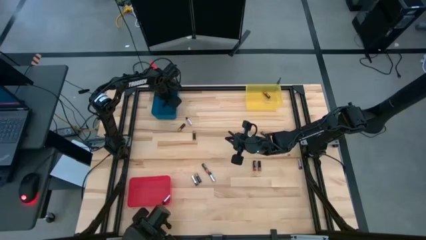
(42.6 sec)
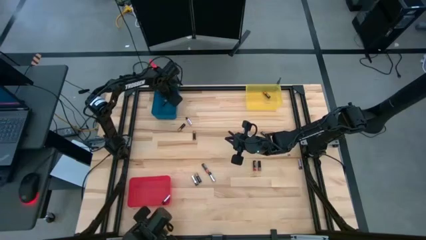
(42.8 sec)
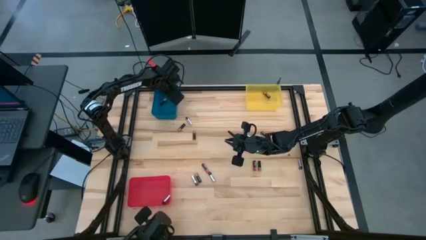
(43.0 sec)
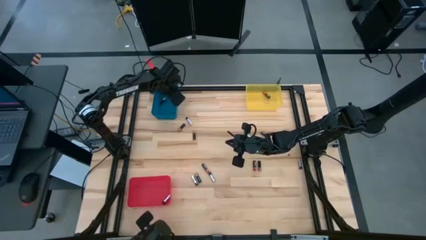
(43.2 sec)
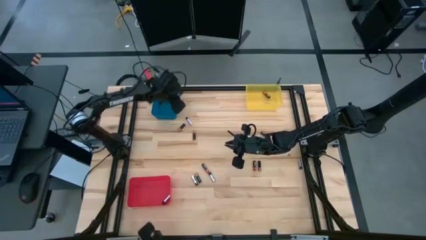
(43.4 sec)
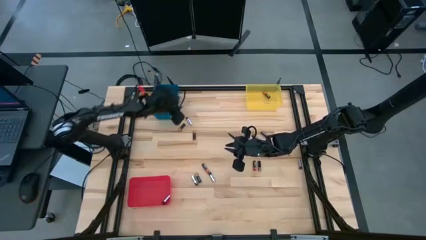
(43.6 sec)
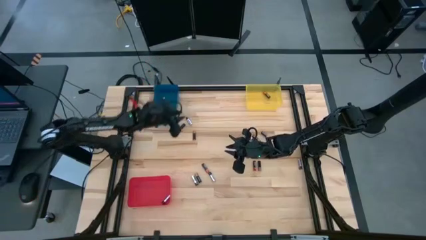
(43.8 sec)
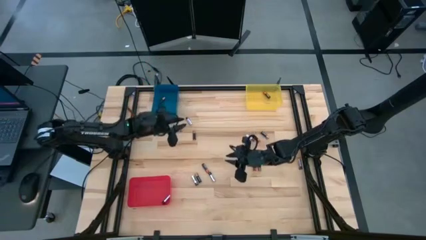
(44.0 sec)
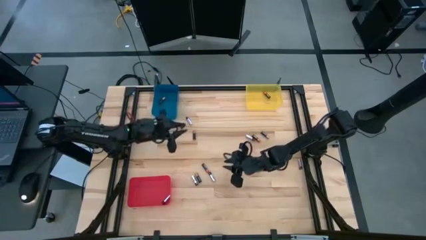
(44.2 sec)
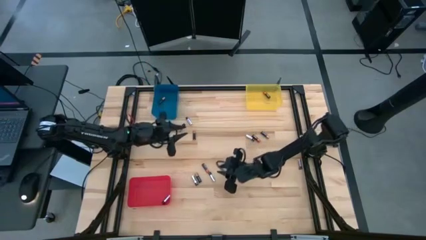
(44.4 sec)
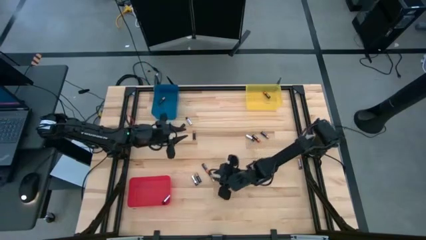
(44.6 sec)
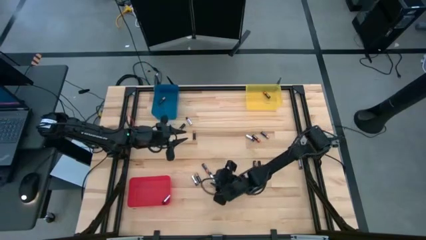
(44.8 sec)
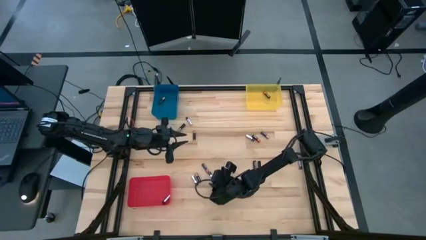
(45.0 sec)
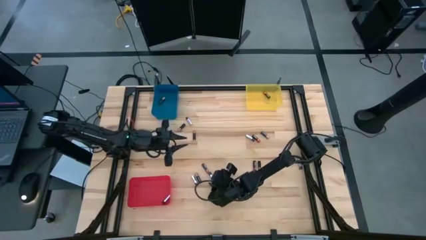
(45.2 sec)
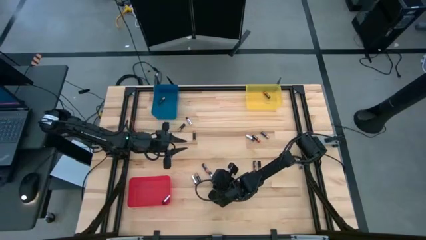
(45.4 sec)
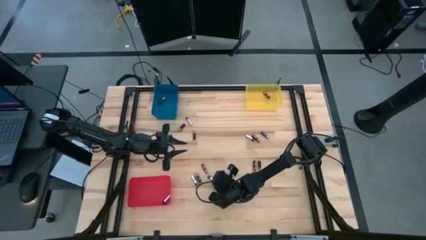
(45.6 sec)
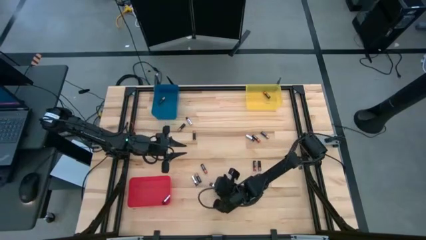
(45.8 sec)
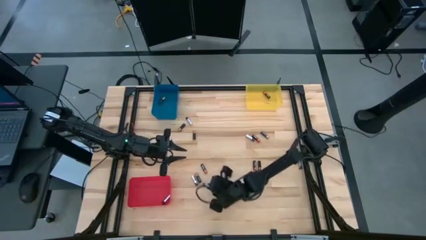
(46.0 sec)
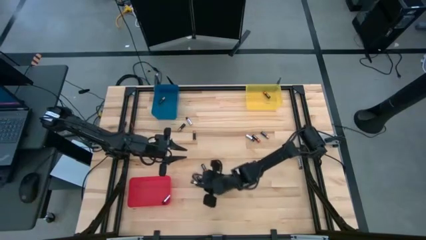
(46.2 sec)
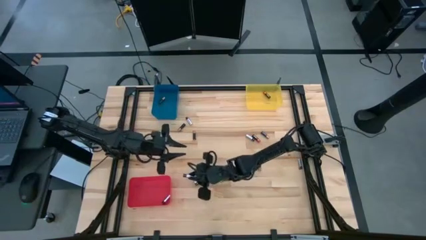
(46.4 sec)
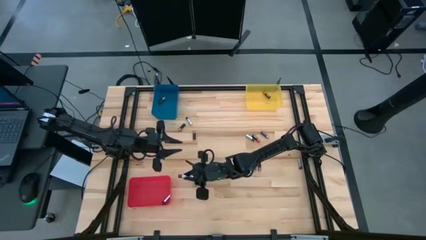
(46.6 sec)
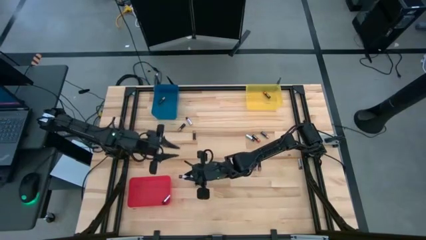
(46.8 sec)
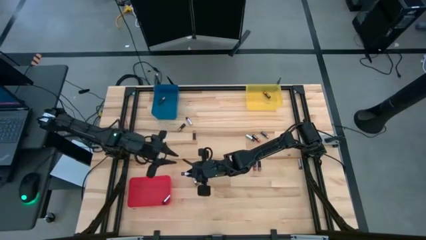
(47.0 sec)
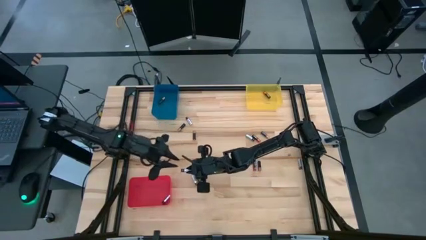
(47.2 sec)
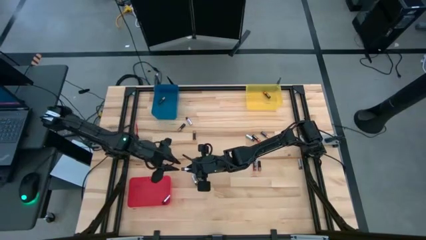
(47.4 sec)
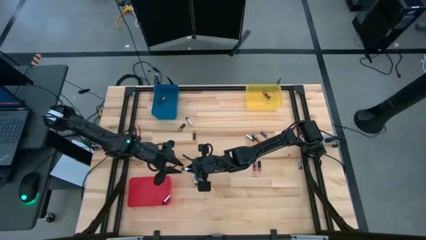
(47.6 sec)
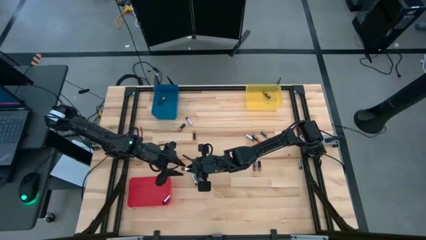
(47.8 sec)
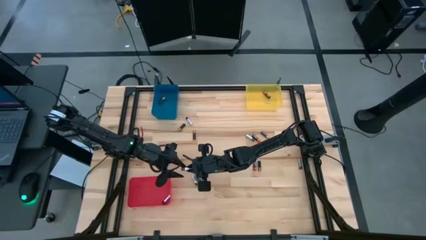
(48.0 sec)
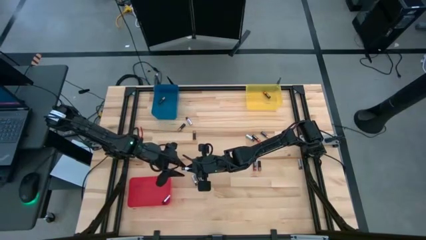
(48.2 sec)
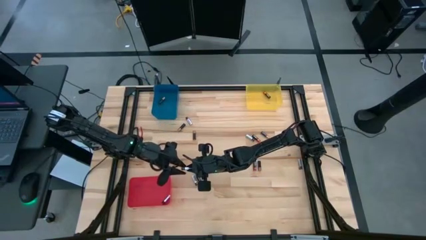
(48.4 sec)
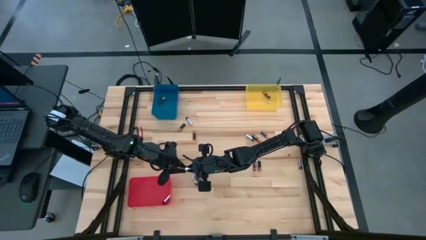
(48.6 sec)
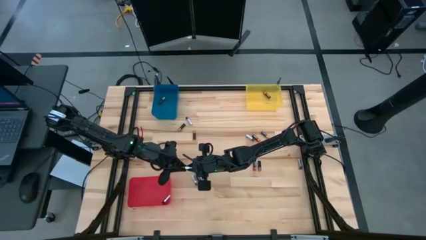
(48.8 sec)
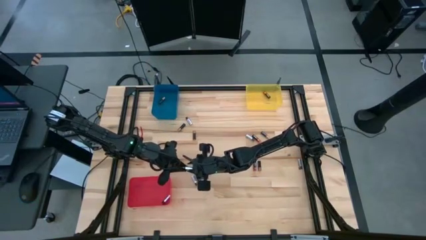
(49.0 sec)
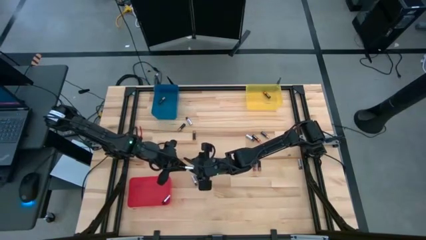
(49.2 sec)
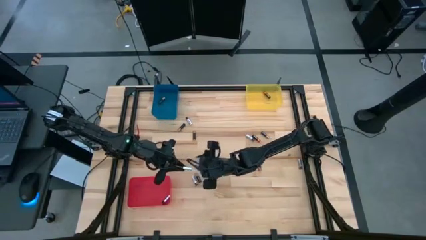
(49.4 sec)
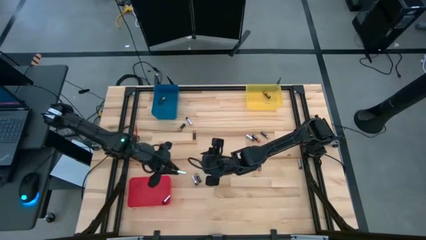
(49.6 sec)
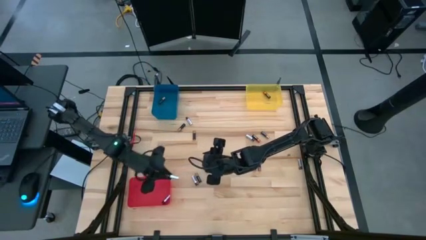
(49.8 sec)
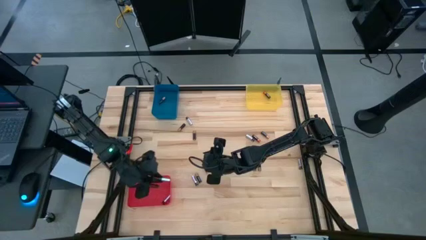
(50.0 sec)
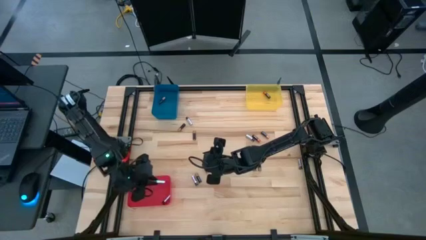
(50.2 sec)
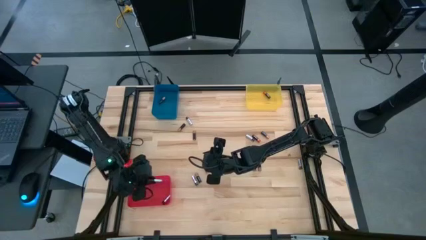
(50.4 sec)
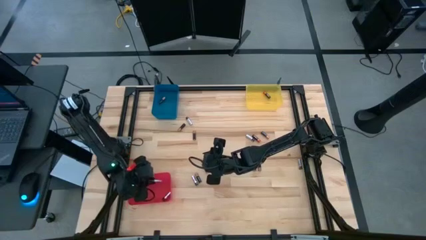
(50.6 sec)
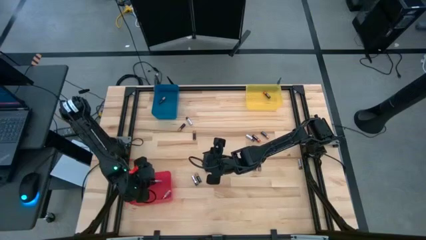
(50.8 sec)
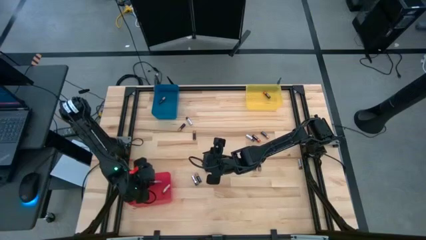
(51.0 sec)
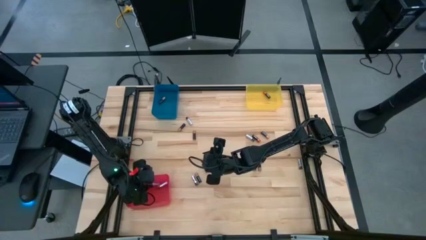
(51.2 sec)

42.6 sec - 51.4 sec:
Task: Sort batteries
Put the silver battery into the red bin

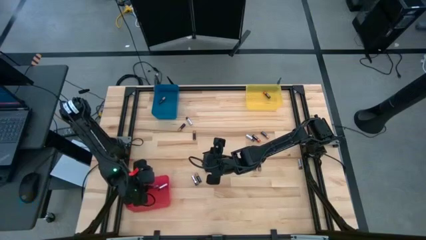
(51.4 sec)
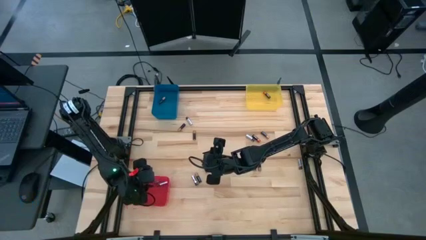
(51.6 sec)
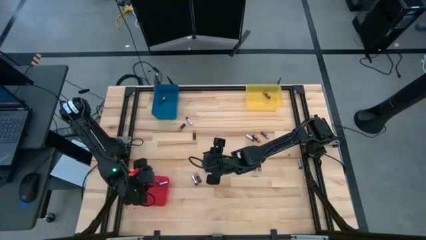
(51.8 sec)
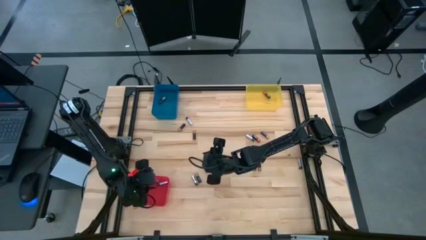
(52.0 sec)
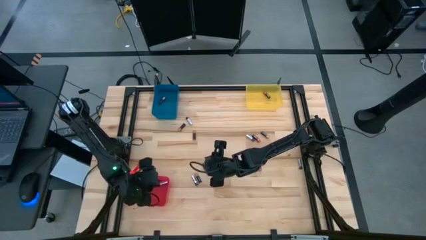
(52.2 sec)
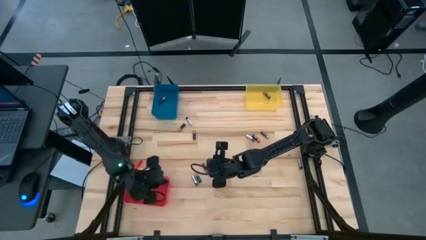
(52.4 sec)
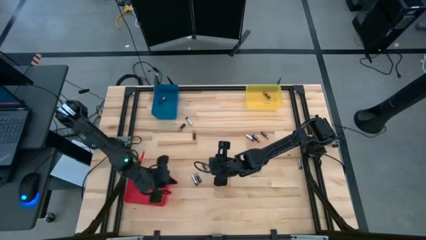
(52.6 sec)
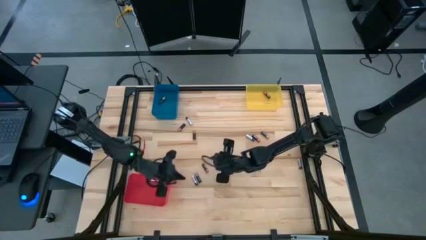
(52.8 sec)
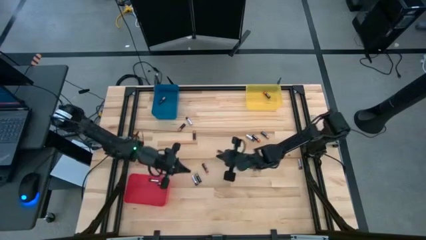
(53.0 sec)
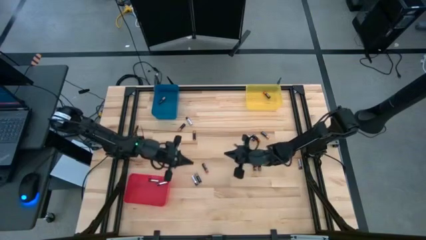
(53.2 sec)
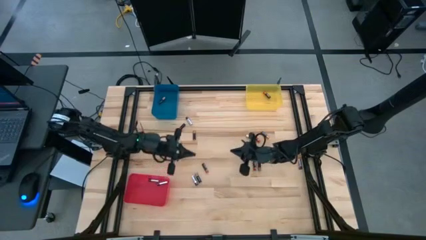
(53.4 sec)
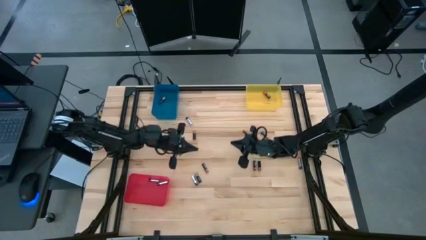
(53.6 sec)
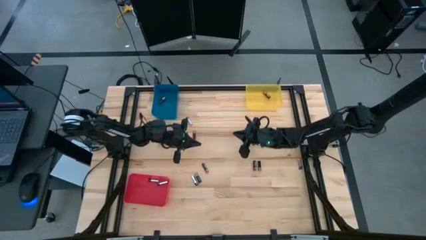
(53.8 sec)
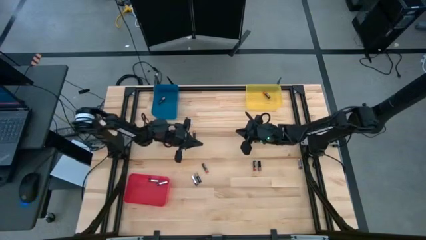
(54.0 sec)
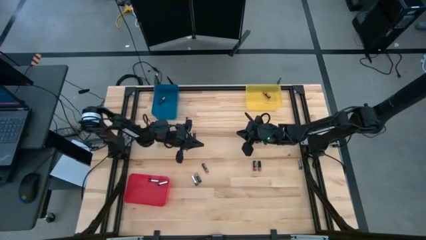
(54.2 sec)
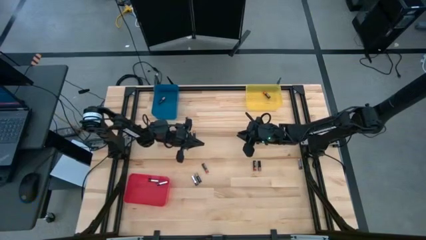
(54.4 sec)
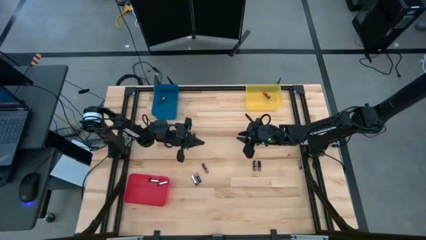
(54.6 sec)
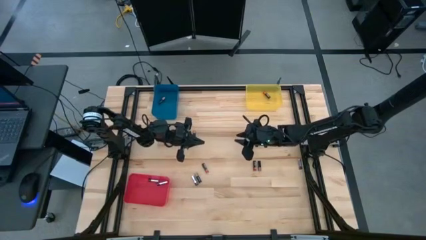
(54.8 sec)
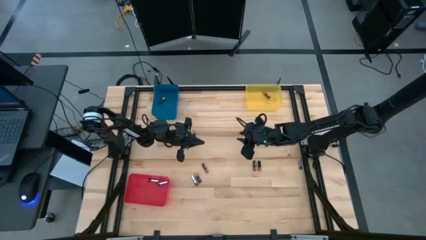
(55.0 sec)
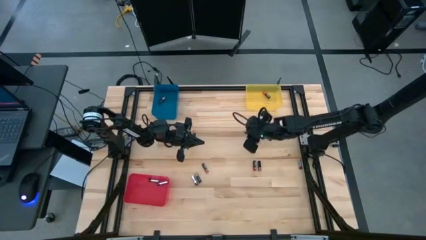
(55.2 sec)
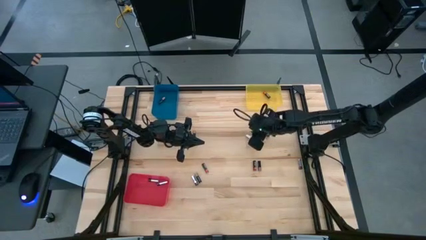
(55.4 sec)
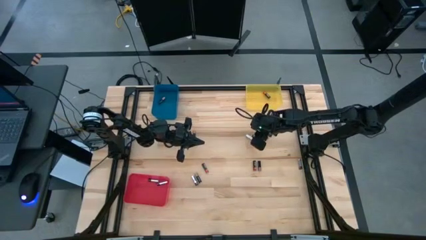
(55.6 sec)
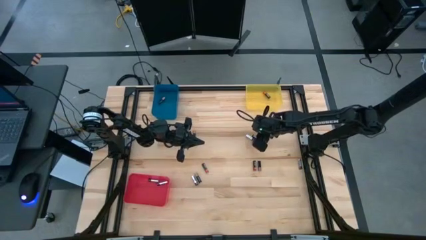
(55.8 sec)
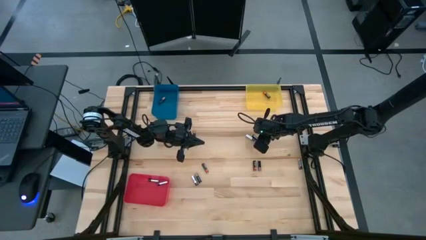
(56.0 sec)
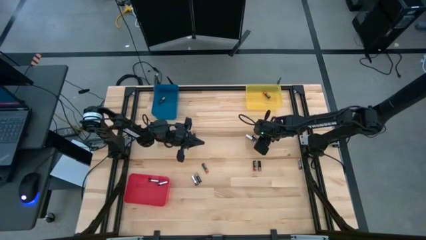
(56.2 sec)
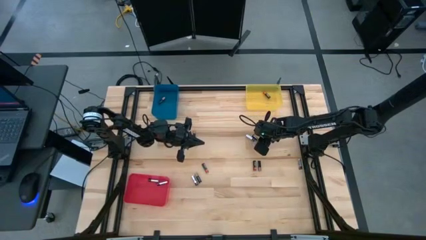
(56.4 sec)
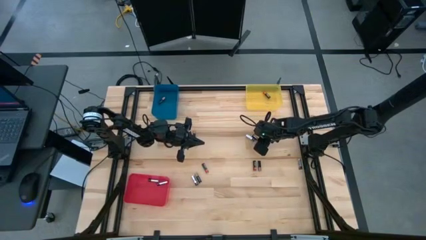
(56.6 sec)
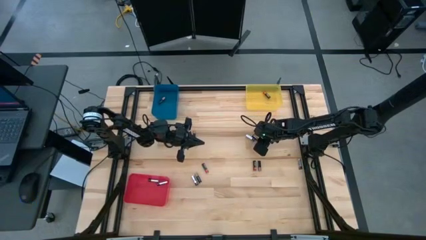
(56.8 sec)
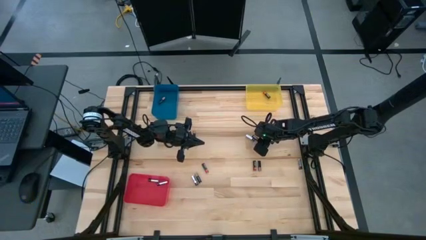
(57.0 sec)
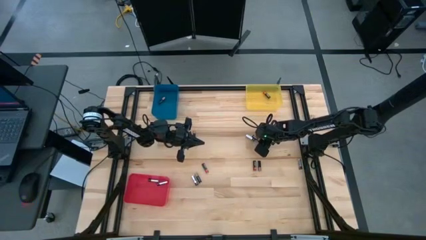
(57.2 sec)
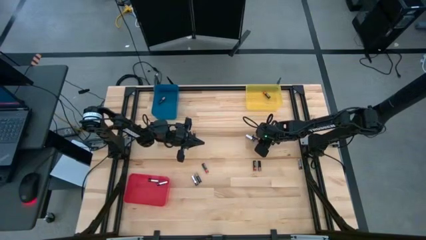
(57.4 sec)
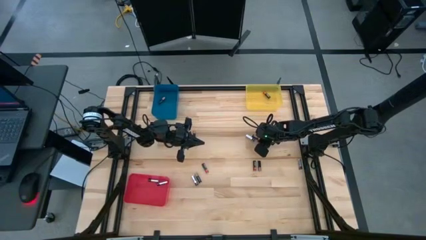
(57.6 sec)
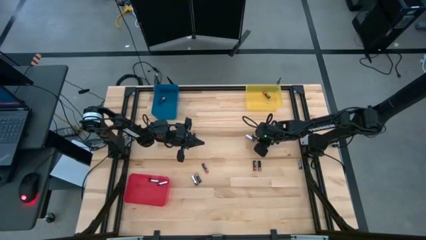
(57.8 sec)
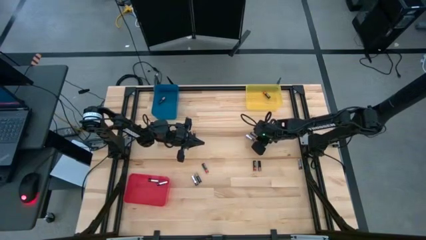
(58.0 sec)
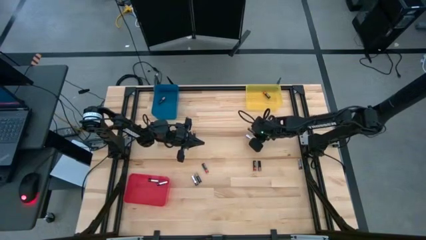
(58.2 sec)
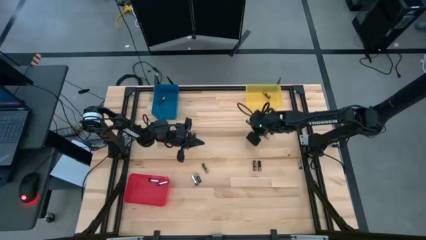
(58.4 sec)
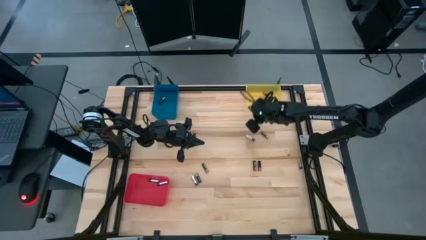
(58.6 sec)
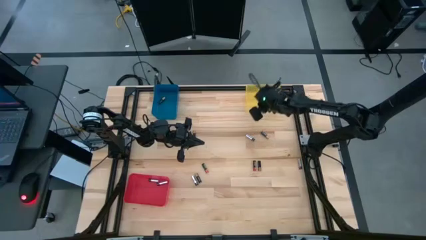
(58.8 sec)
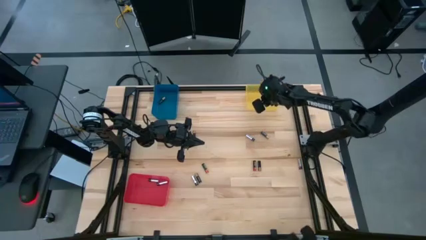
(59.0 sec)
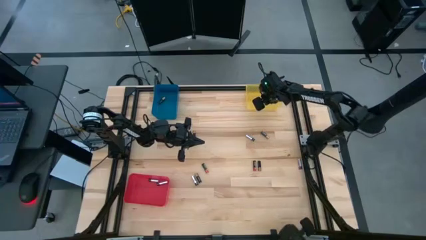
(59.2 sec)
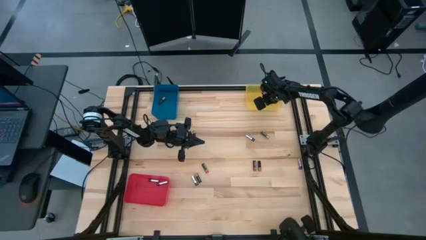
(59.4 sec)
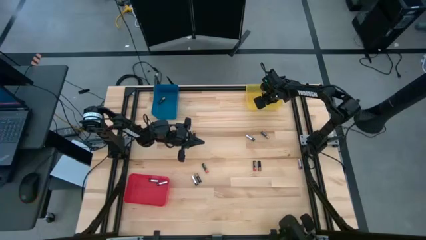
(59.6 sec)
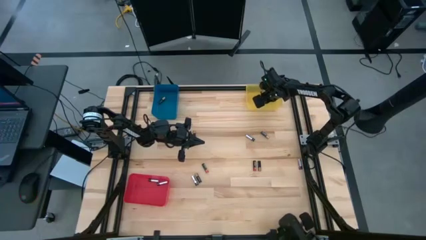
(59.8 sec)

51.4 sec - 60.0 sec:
Put the red battery into the yellow bin
